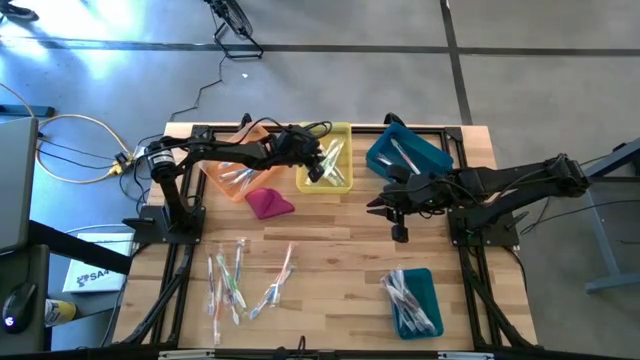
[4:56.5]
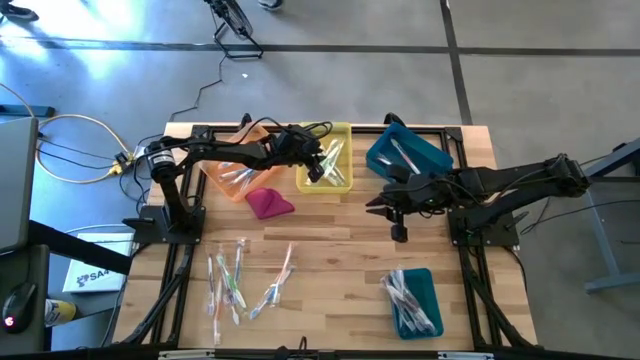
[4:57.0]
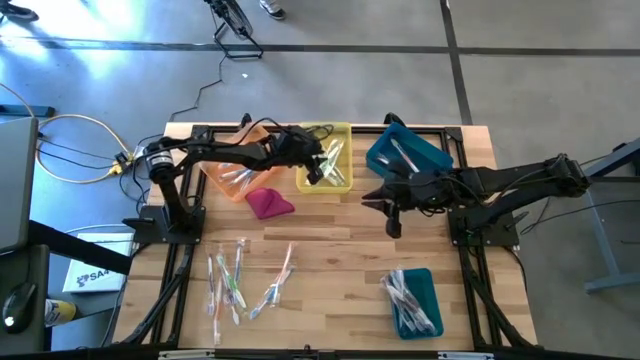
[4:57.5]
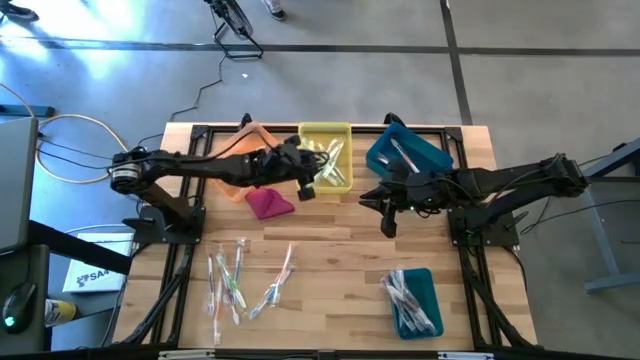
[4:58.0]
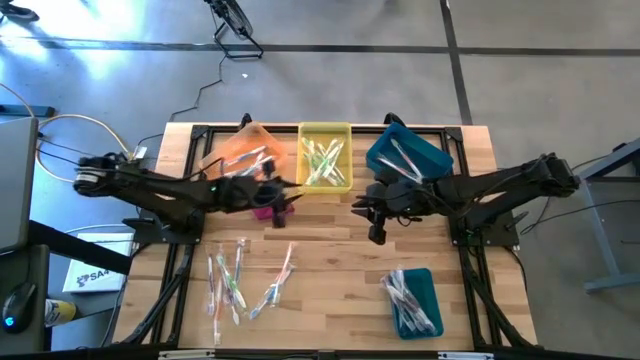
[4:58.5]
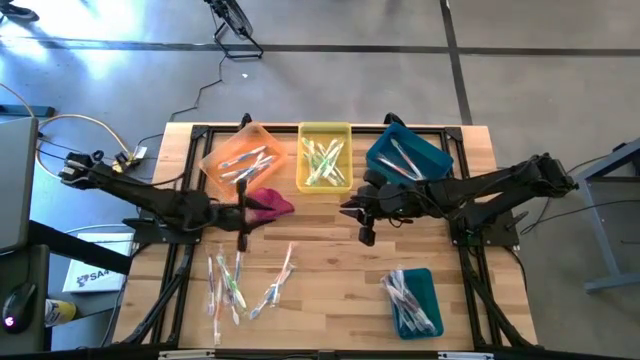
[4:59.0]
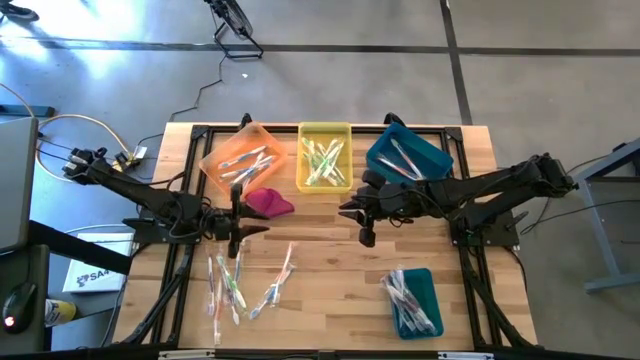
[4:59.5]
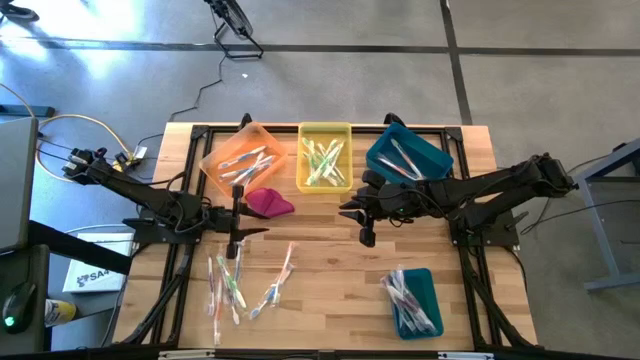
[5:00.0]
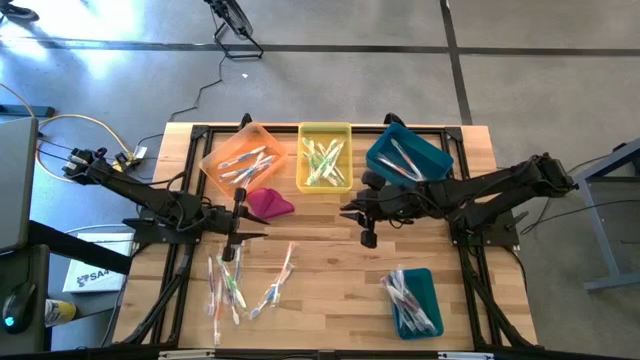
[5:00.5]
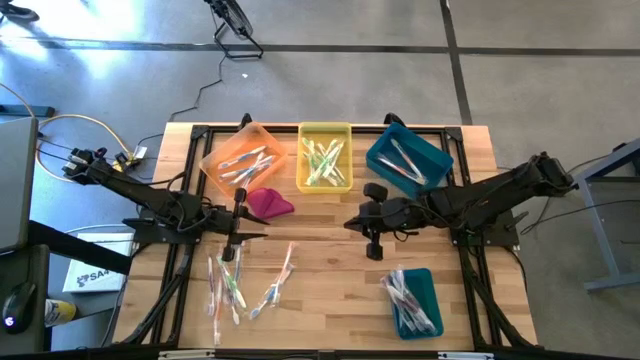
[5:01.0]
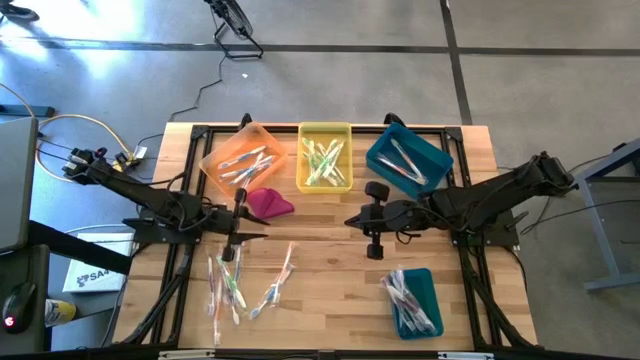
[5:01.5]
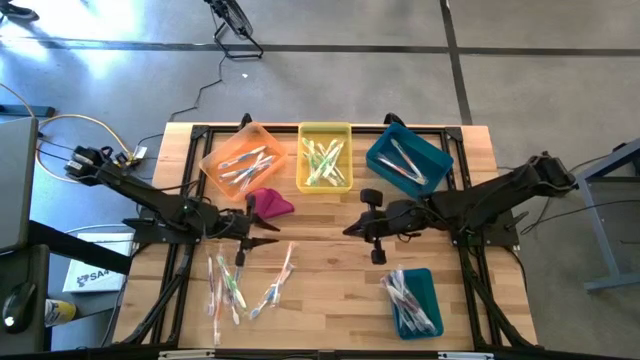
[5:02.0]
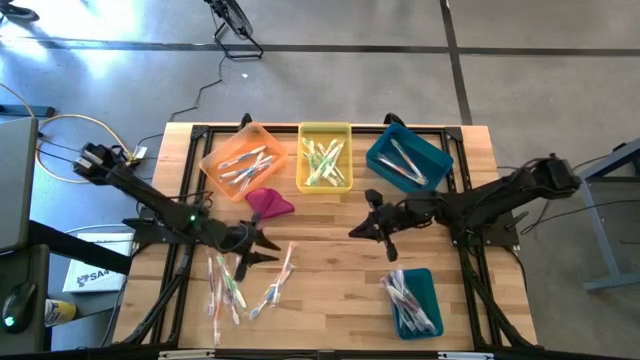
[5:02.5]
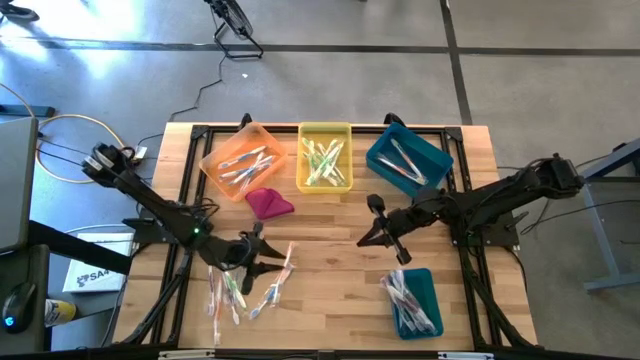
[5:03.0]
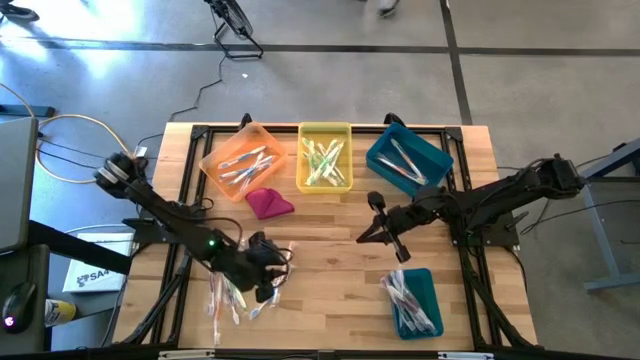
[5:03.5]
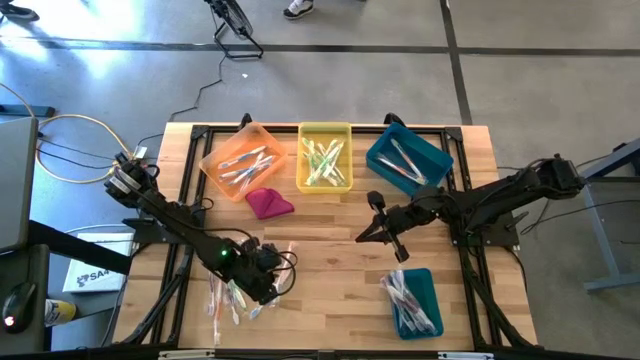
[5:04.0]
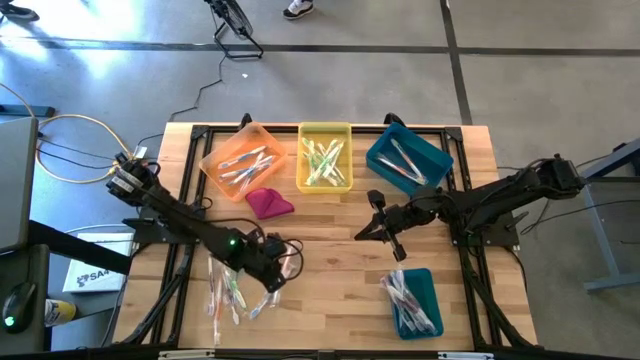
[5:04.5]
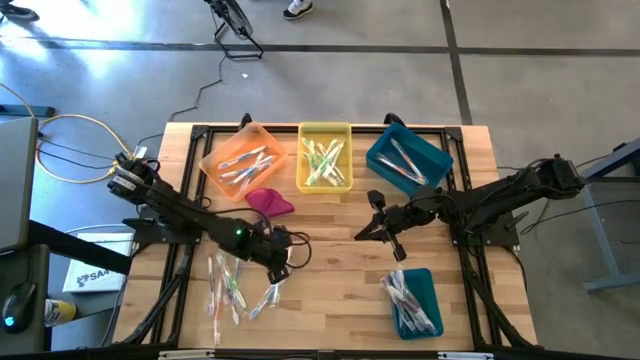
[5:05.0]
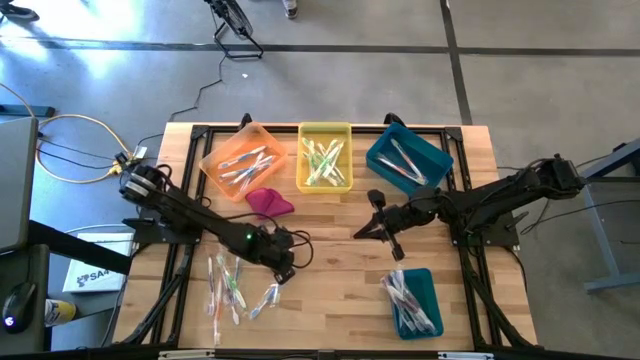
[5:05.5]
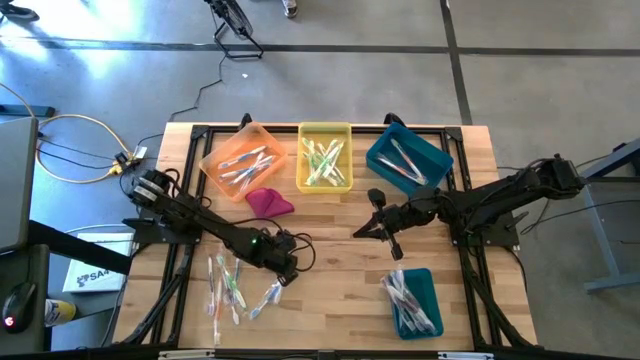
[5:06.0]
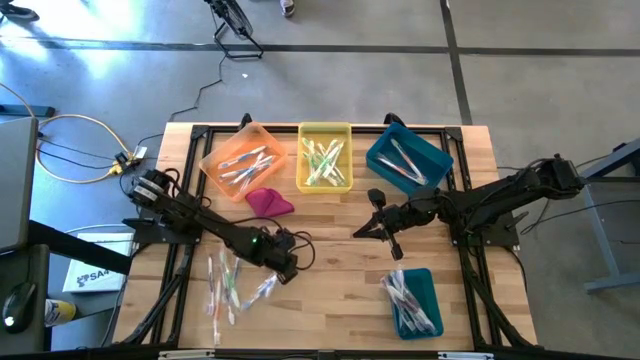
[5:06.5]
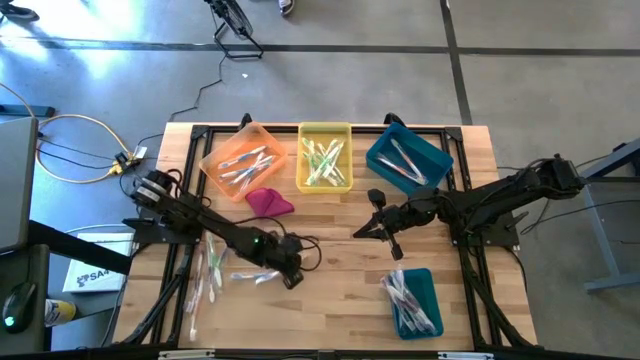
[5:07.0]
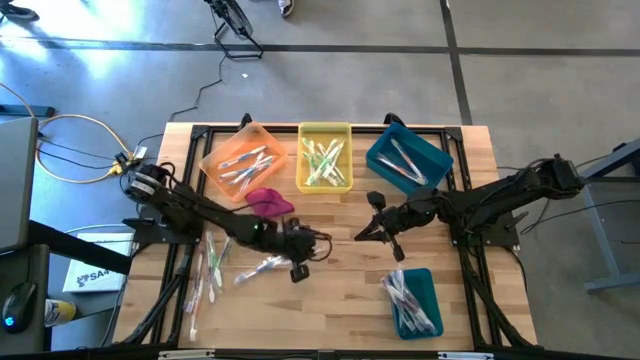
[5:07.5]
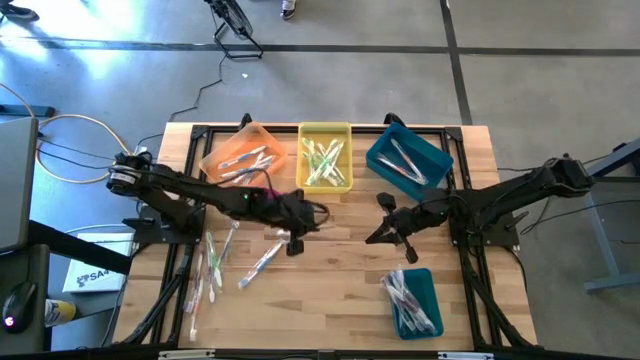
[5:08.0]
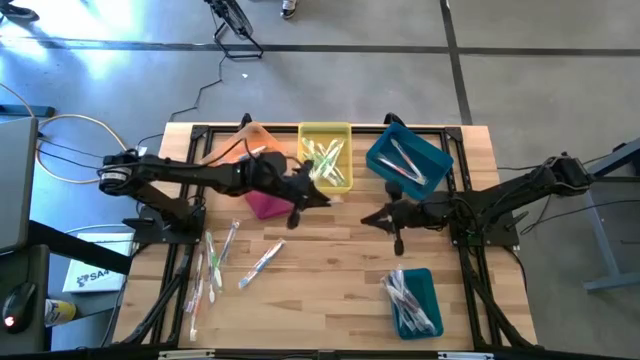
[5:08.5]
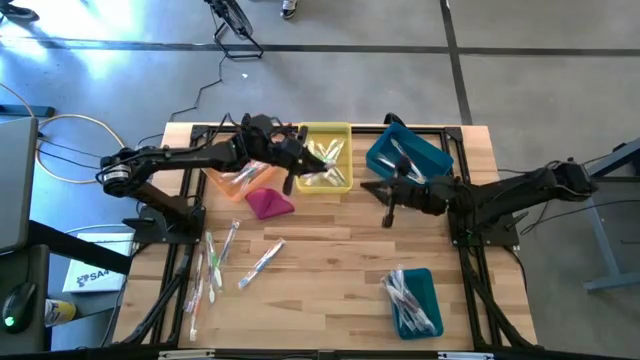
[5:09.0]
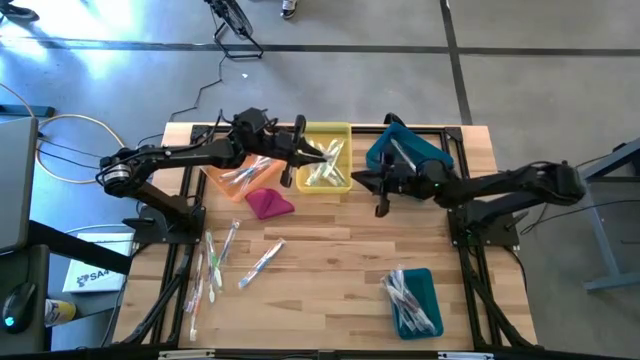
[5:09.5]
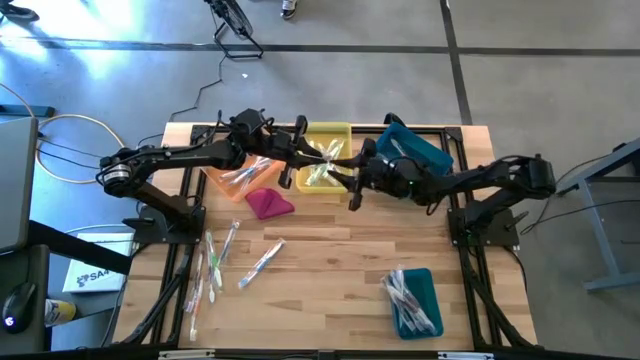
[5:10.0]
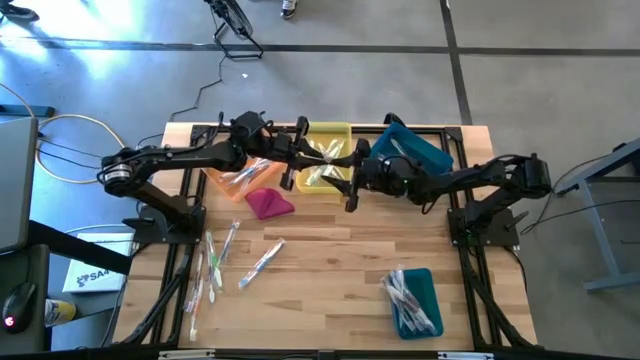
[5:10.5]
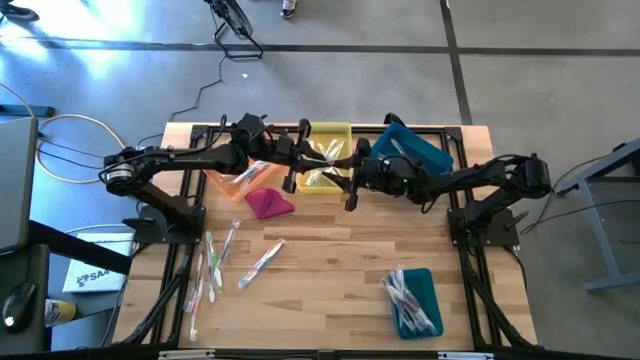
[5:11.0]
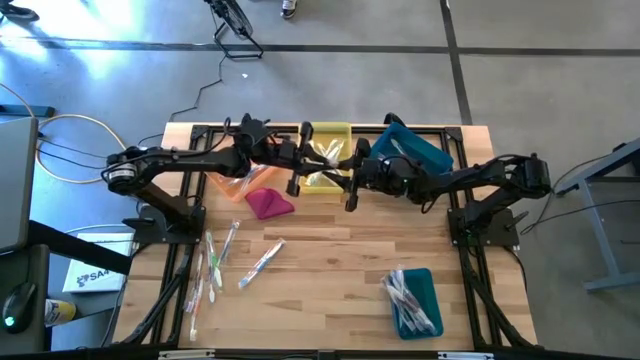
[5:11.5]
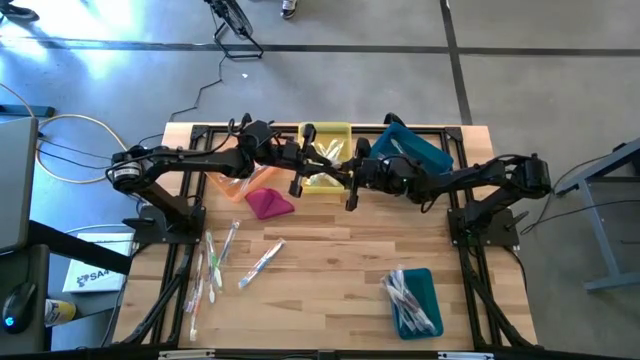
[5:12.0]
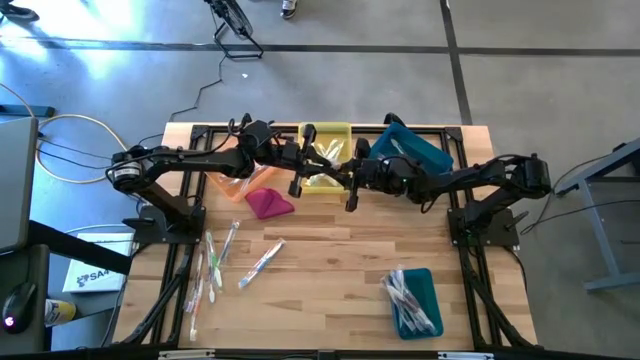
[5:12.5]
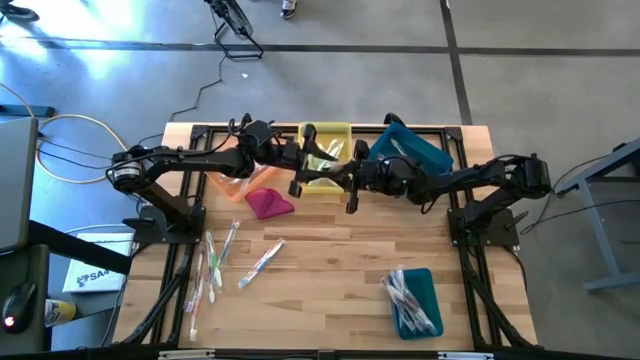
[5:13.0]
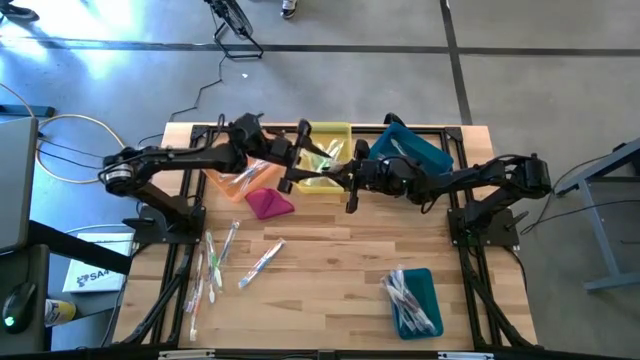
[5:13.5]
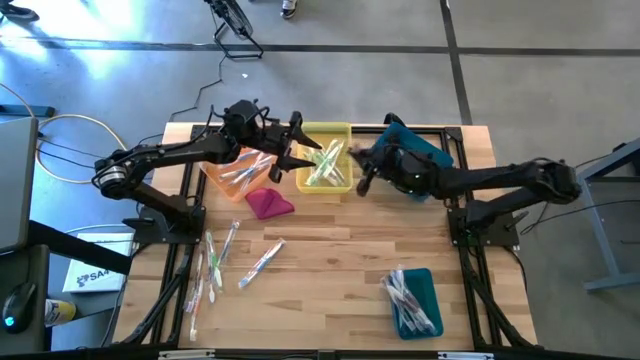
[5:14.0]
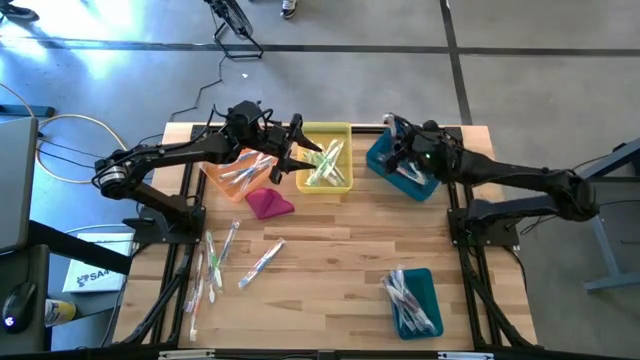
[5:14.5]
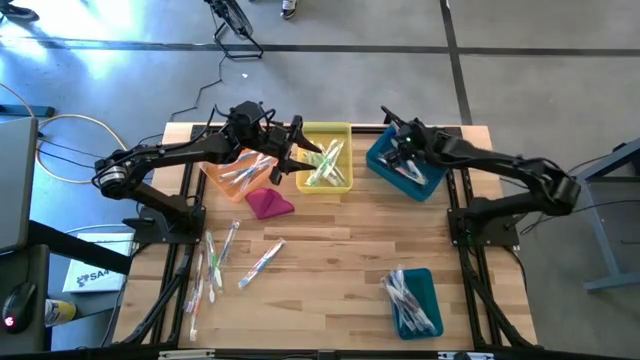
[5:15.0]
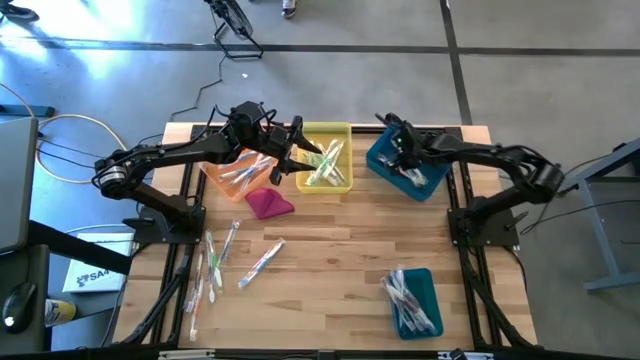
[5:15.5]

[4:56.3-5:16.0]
Task: Pick & Place Toothbrushes
Put the orange toothbrush into the top blue bin

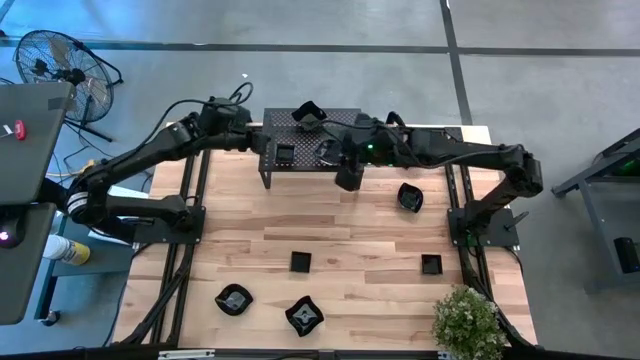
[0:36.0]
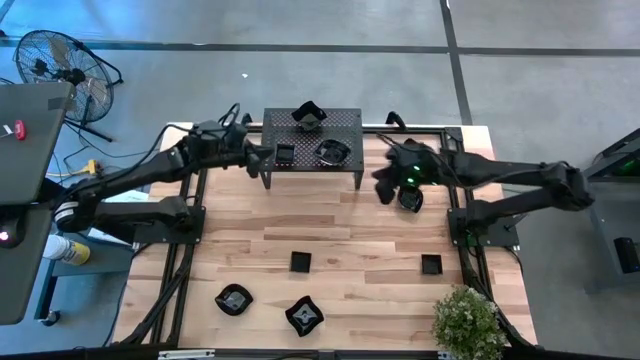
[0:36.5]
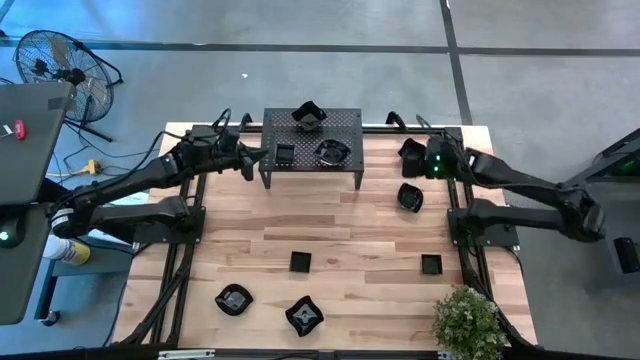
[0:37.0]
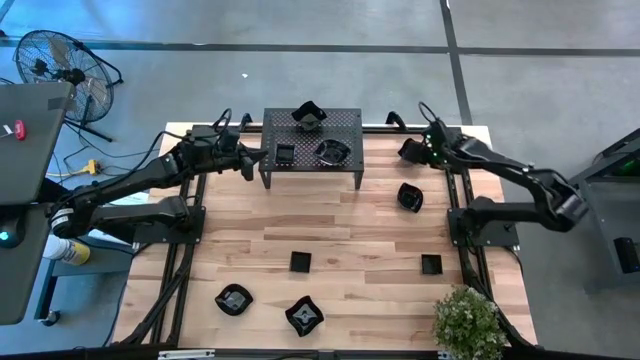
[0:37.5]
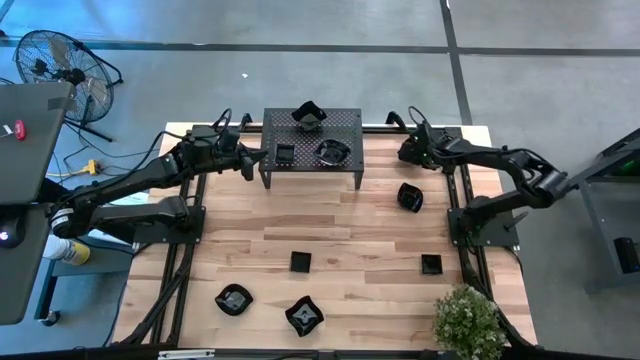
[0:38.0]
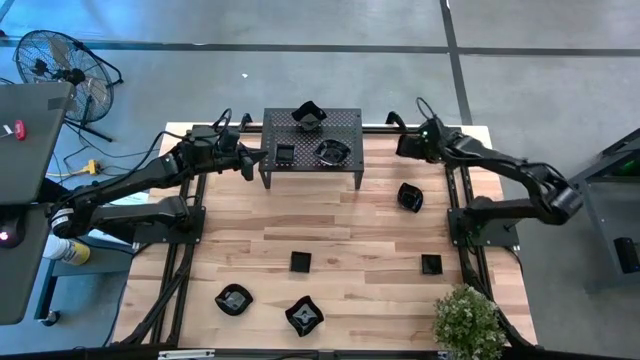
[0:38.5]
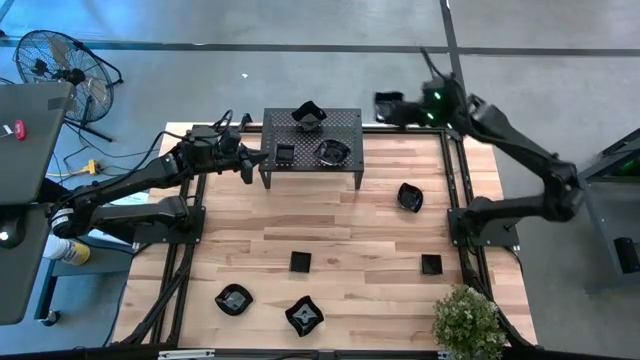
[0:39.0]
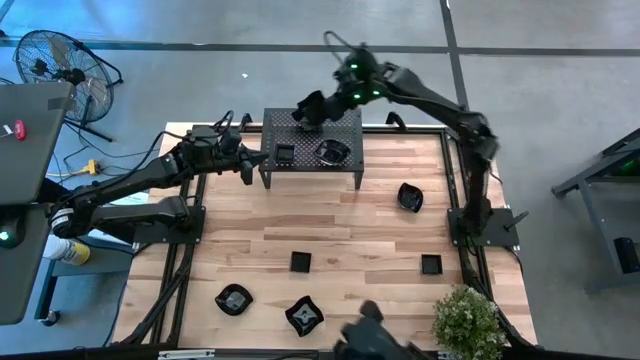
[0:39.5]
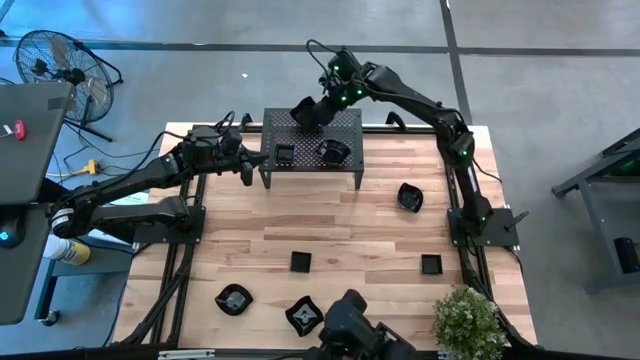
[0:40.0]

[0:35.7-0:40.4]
Task: Pick & Place Mini shaped plates
Stack the black distorted shaped plate on top of the black distorted shaped plate on the shelf
